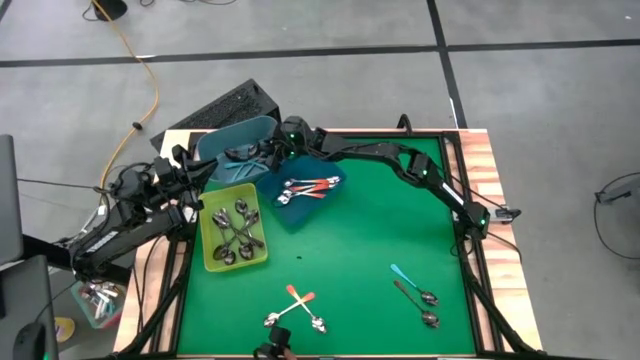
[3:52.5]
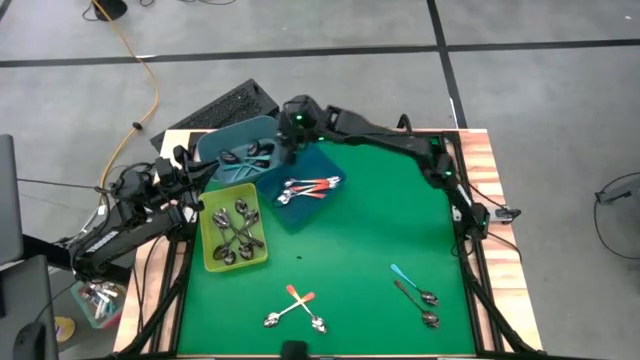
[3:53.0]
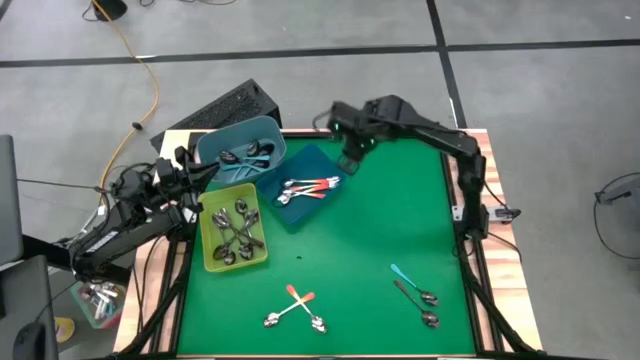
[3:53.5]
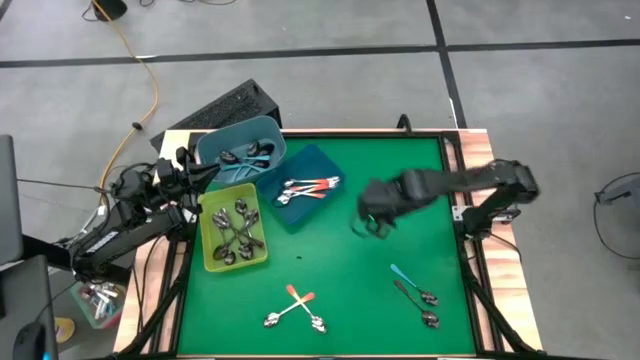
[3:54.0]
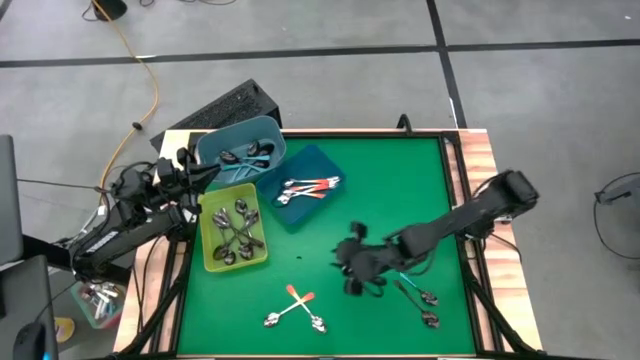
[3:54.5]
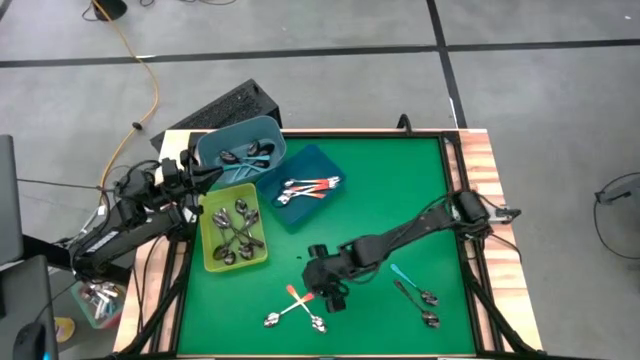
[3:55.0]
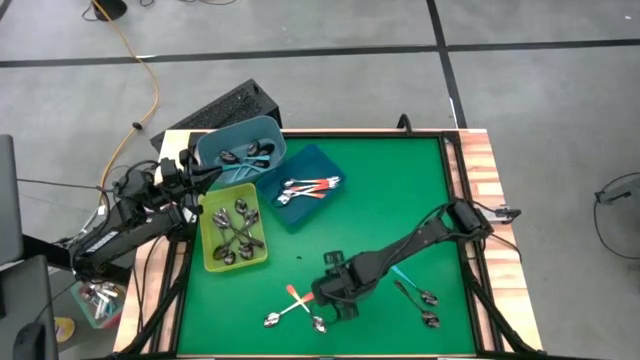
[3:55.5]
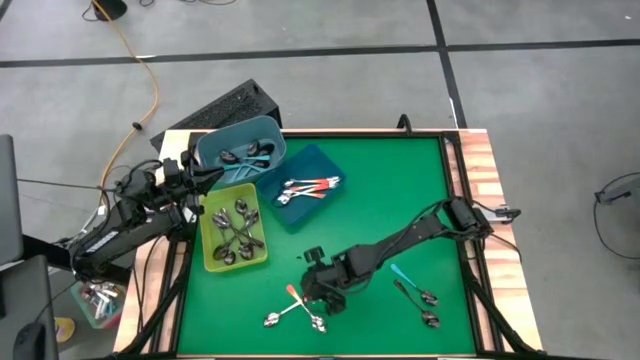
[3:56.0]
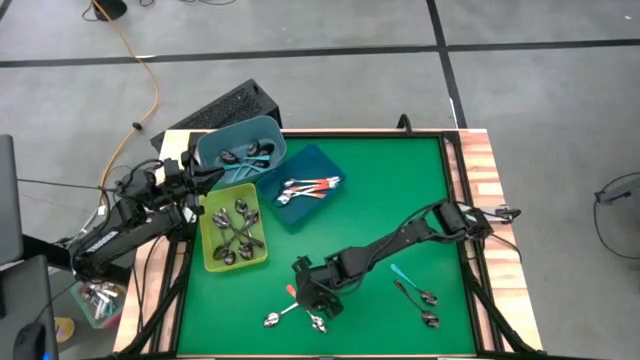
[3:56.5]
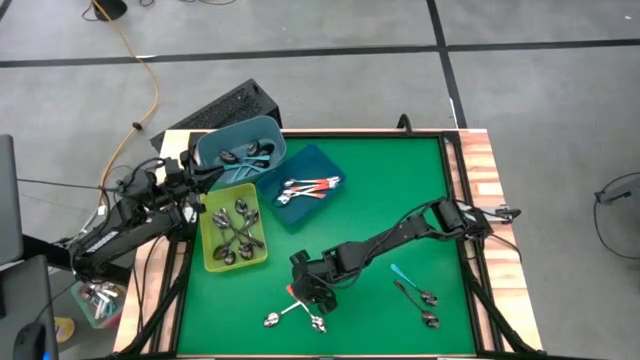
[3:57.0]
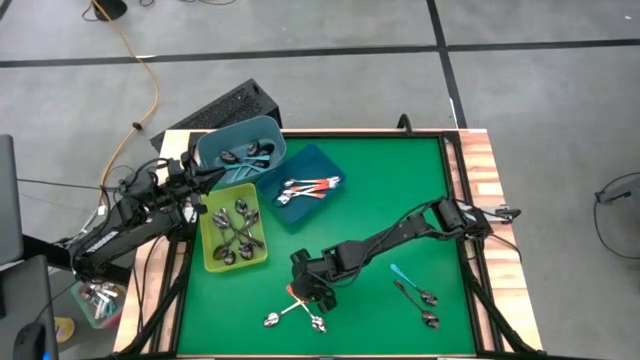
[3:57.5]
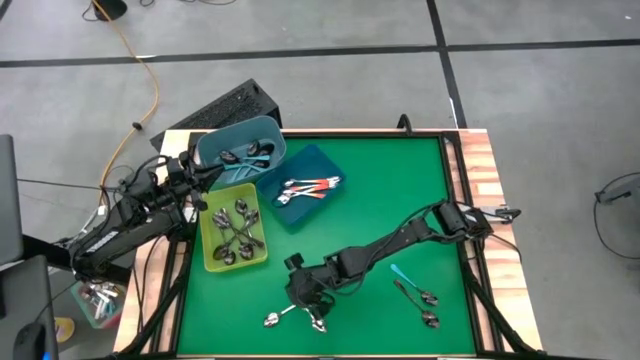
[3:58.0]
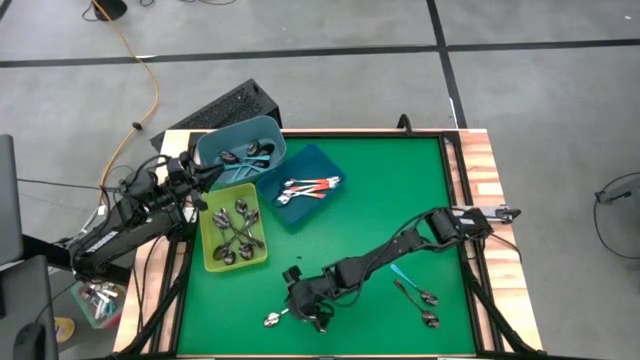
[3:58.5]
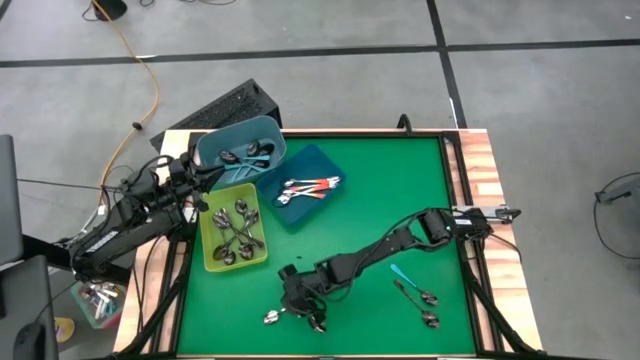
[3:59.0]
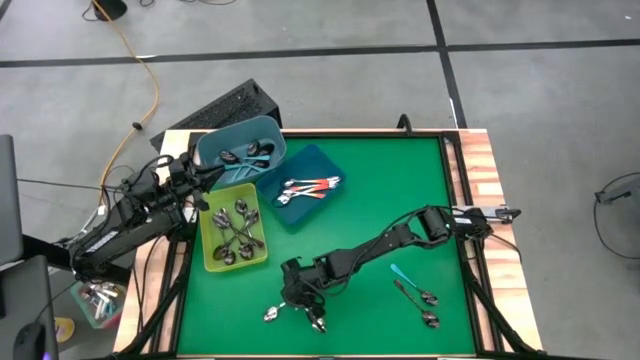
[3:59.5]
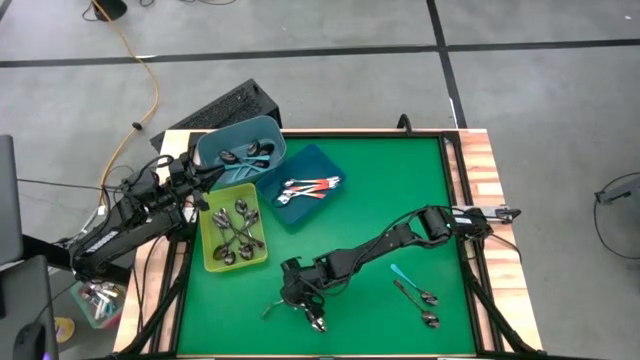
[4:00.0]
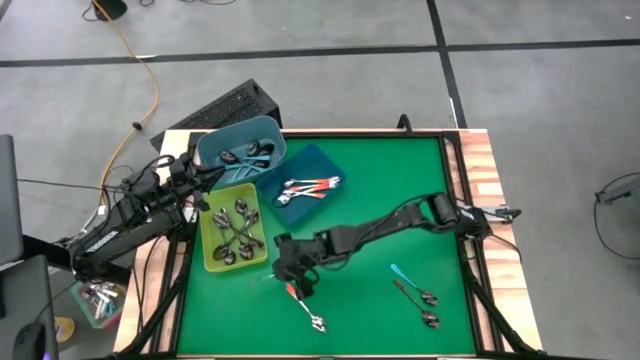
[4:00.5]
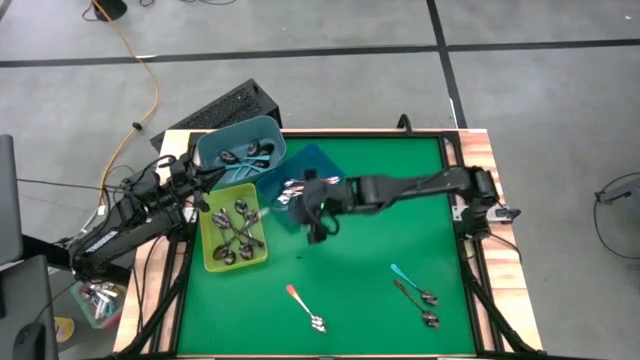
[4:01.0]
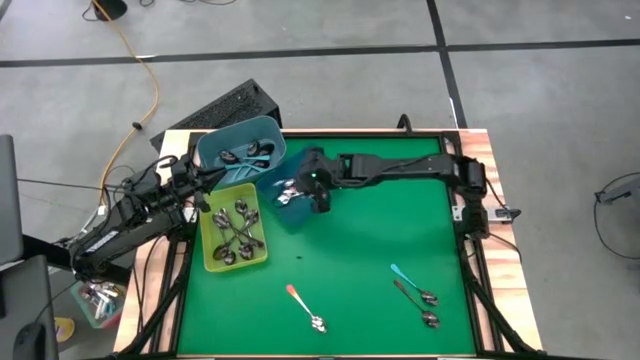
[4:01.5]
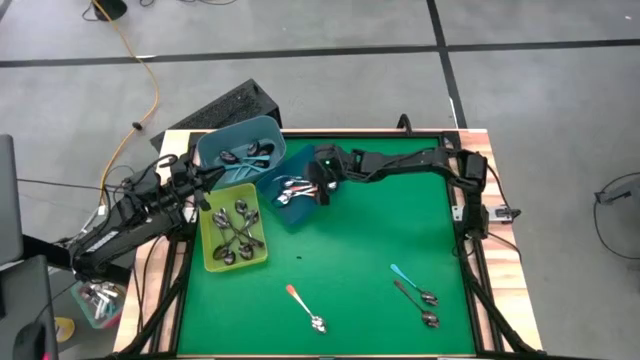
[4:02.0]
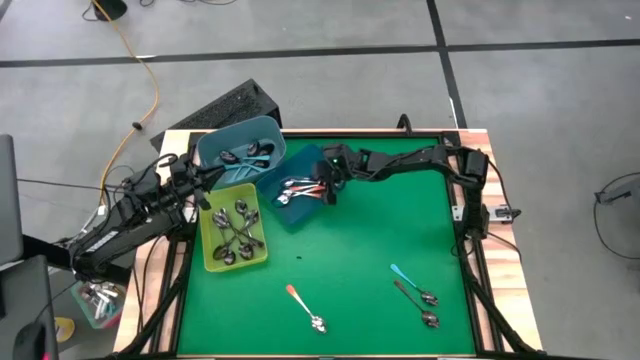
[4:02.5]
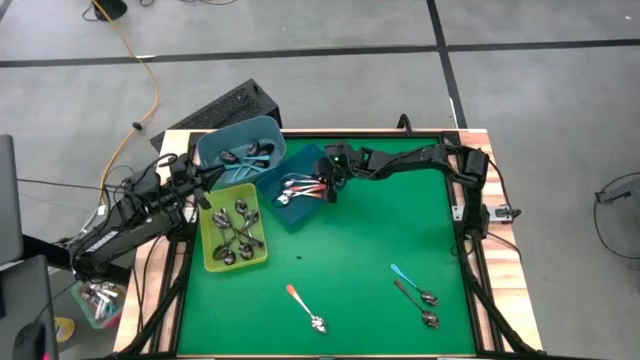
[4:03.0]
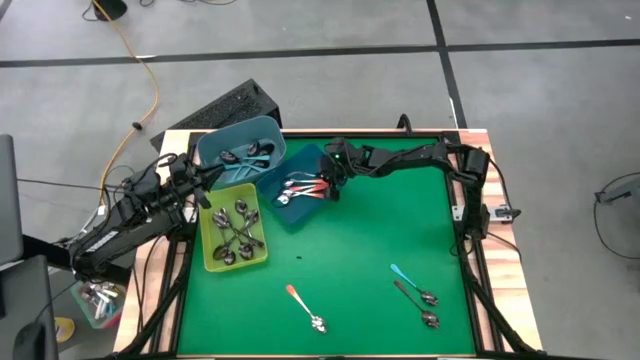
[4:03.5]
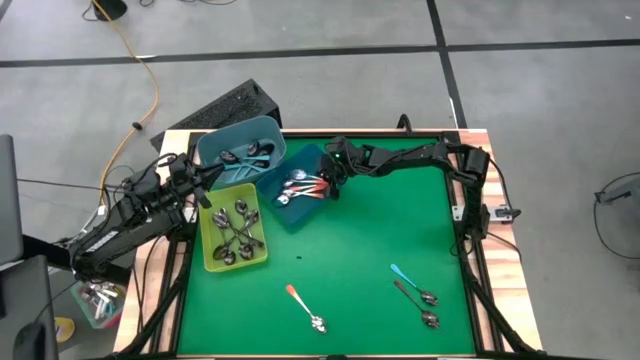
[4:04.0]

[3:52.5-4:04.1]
Task: Sort silverware by color (type)
Put the orange spoon into the blue bin

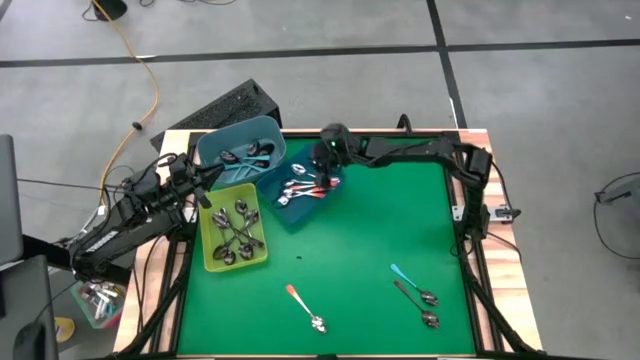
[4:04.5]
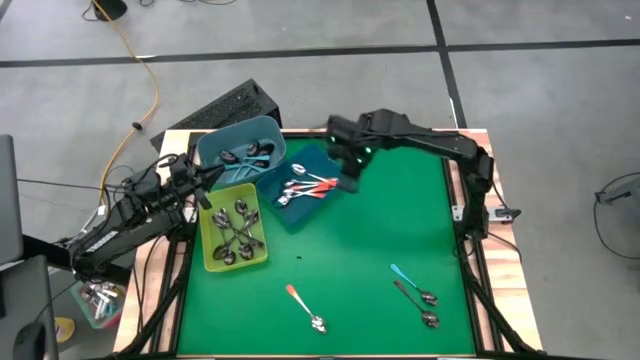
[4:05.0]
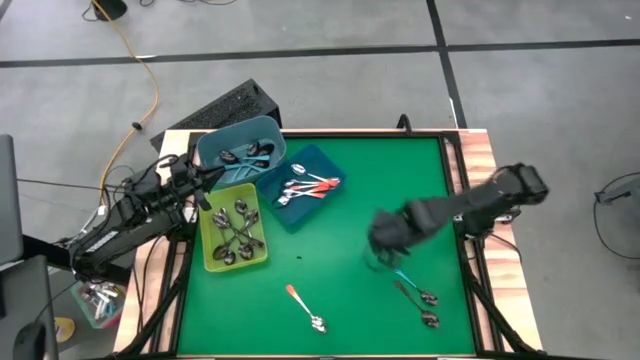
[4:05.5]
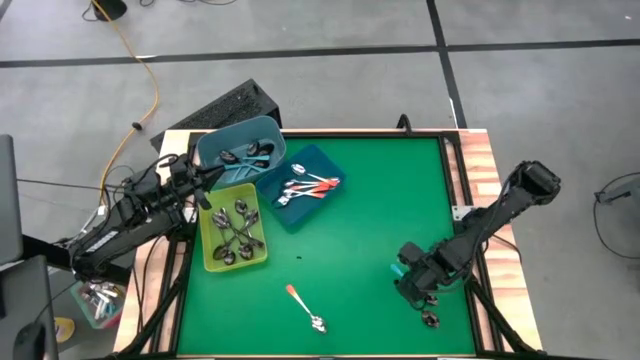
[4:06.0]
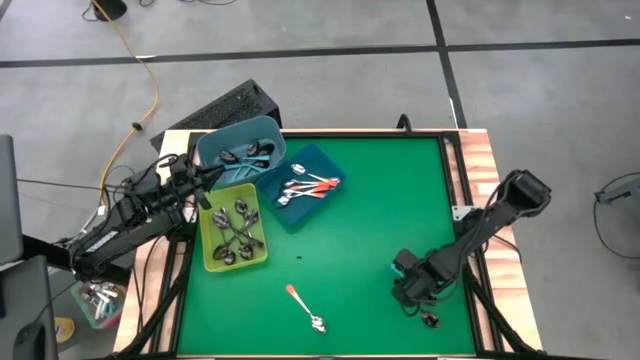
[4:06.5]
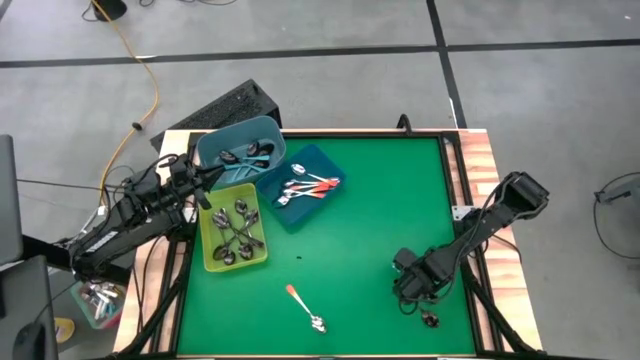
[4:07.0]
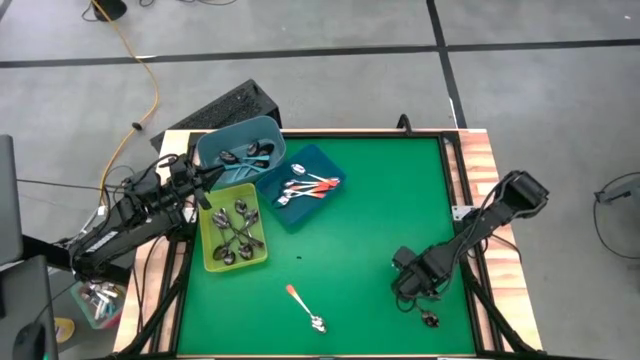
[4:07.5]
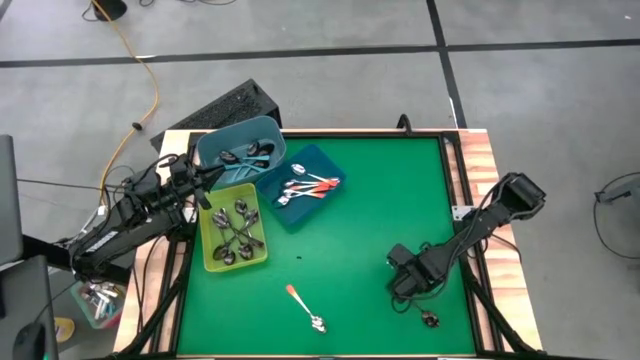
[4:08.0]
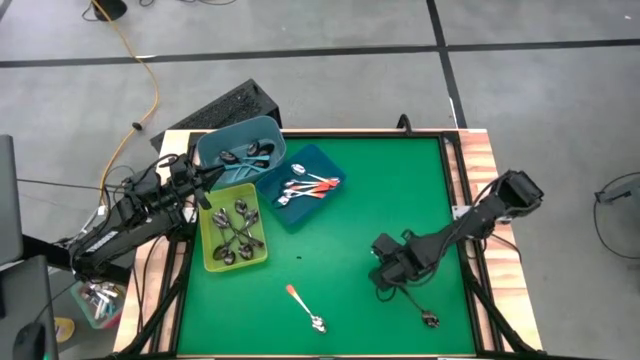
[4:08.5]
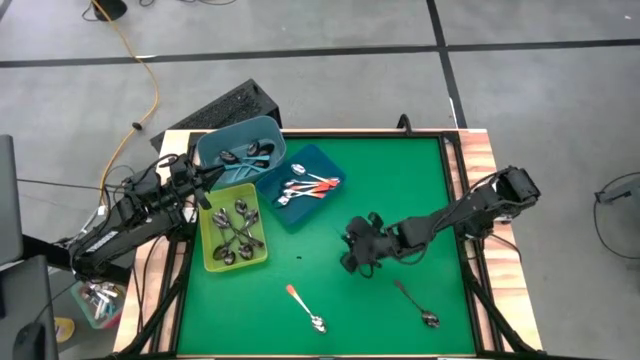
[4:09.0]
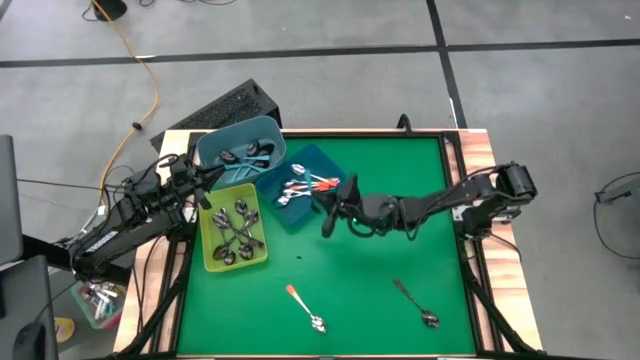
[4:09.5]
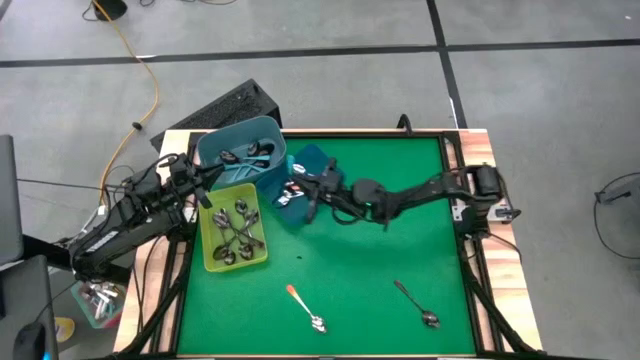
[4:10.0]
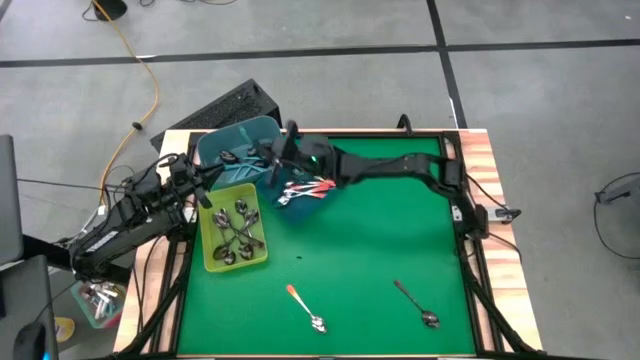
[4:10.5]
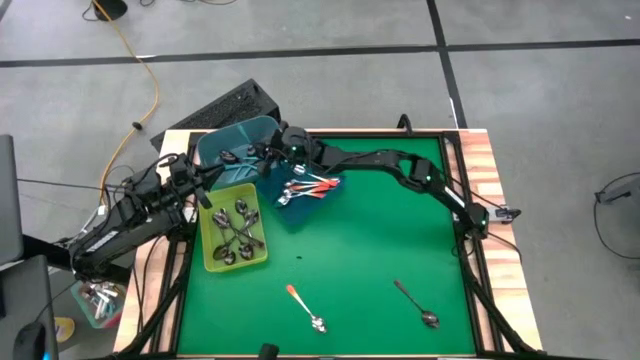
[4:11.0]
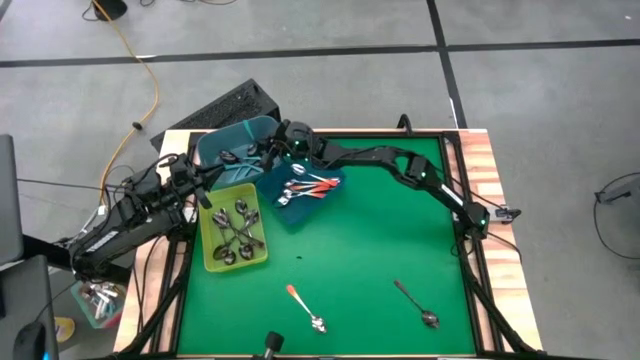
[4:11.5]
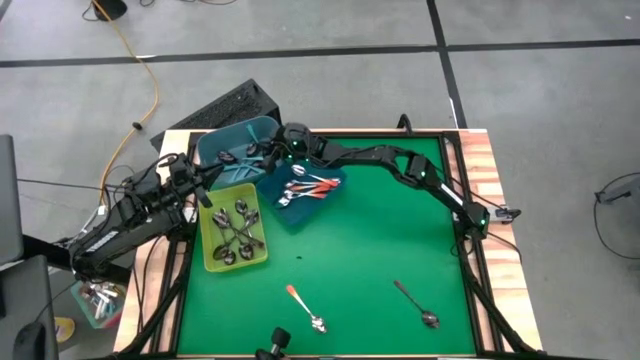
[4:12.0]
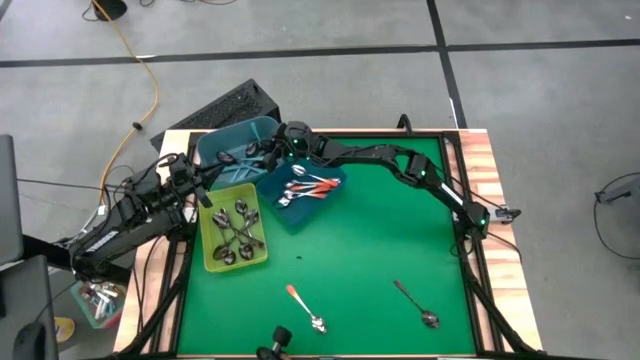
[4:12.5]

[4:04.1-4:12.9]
Put the blue spoon into the light blue bin
